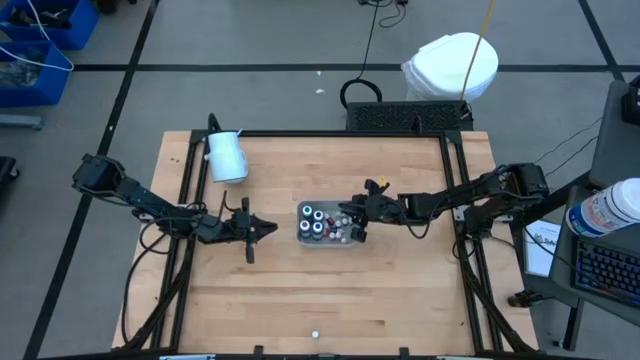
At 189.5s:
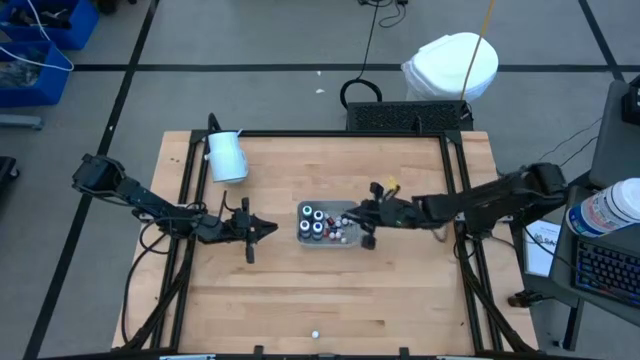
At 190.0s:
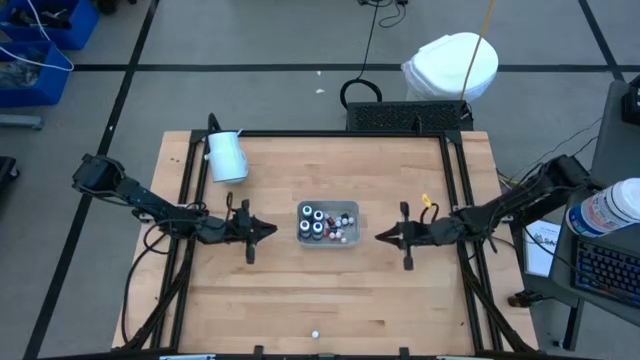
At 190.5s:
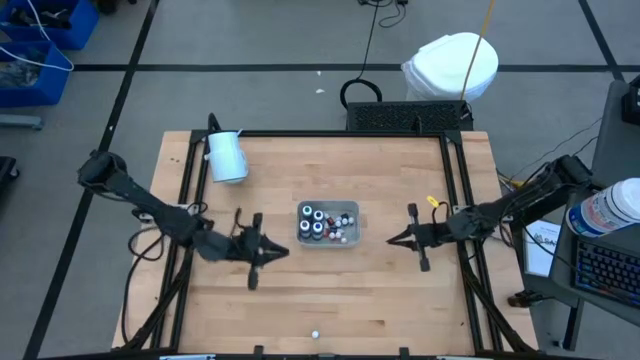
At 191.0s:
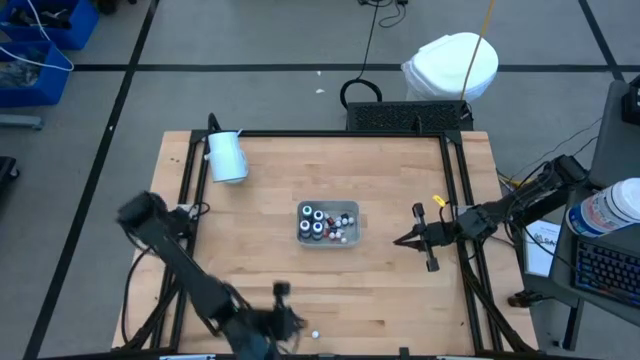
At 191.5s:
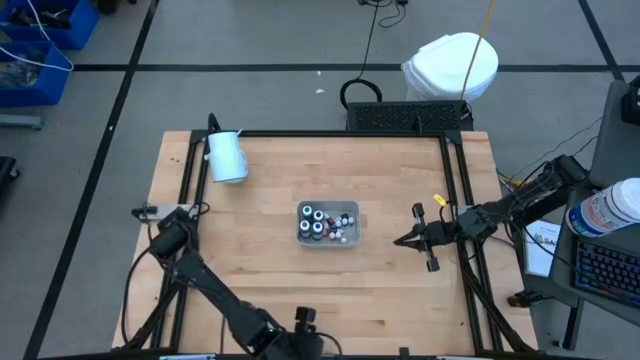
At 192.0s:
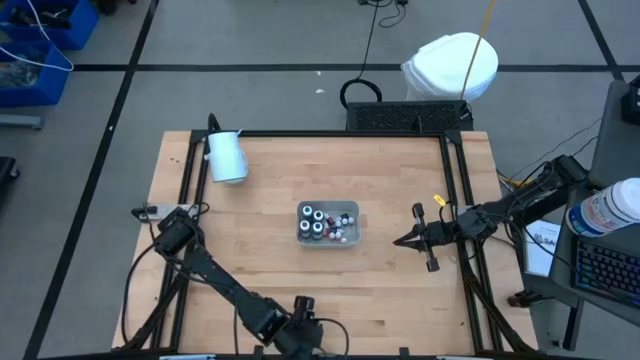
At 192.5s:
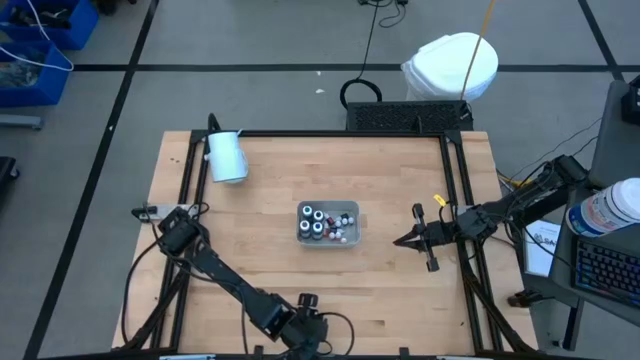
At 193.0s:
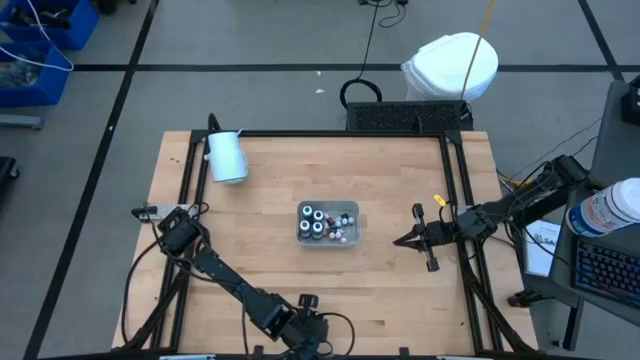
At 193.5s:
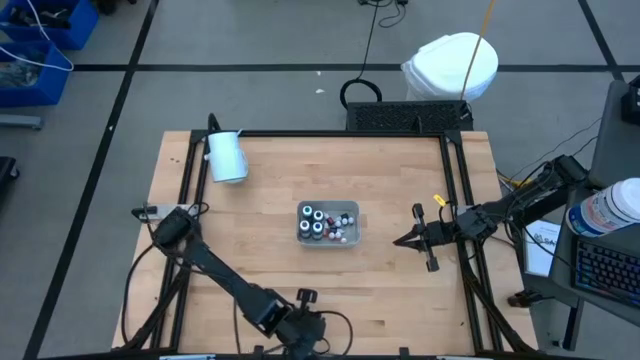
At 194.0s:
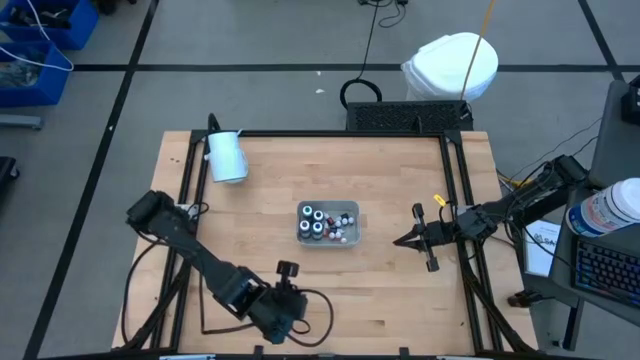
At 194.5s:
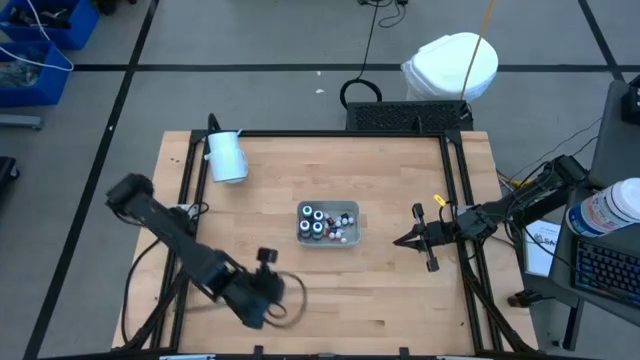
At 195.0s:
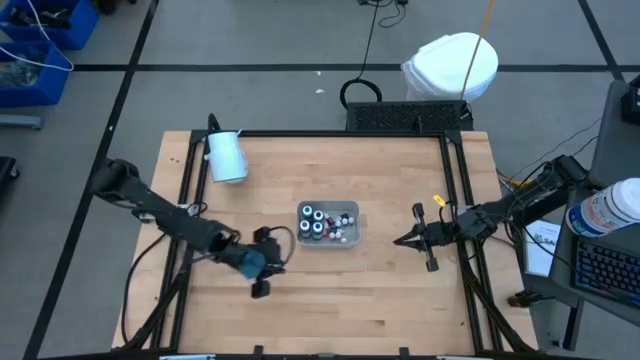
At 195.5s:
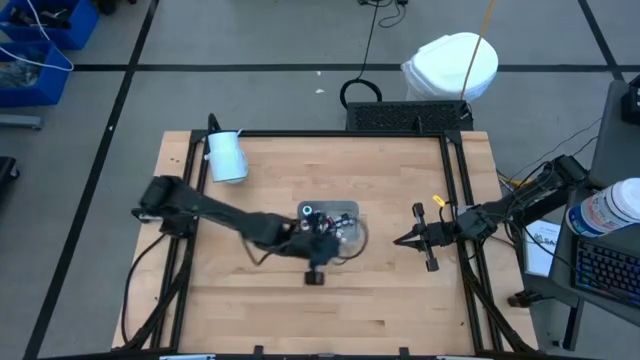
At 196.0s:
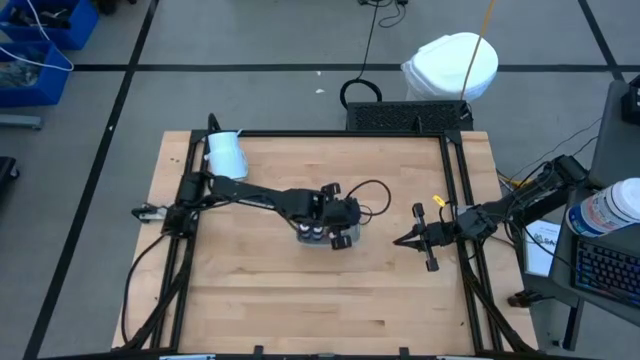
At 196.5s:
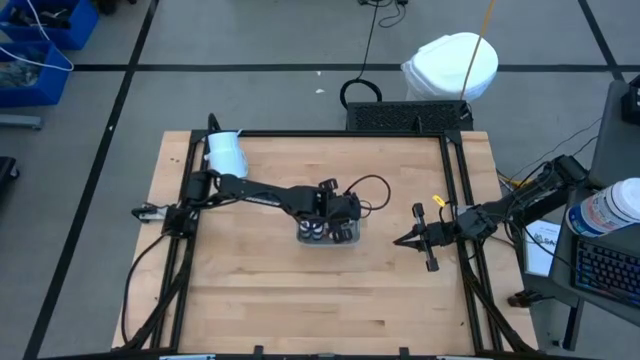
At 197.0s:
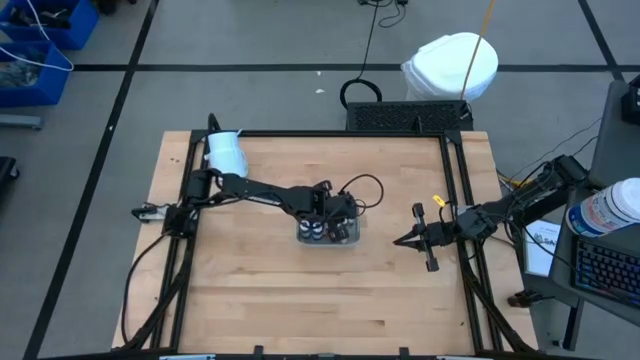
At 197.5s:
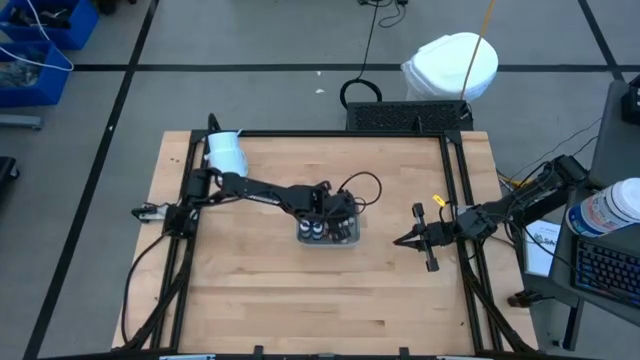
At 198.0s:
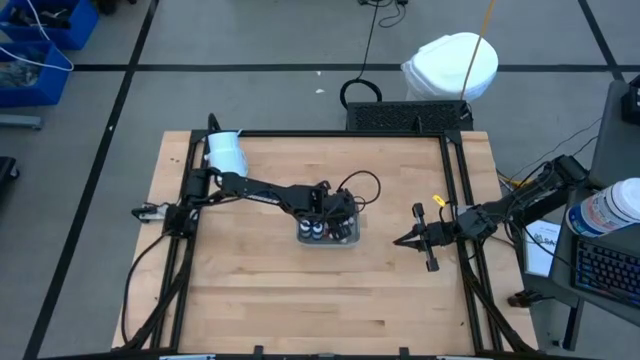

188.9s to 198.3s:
Task: Pick & Place food coloring
Put the small violet food coloring bottle into the gray bin

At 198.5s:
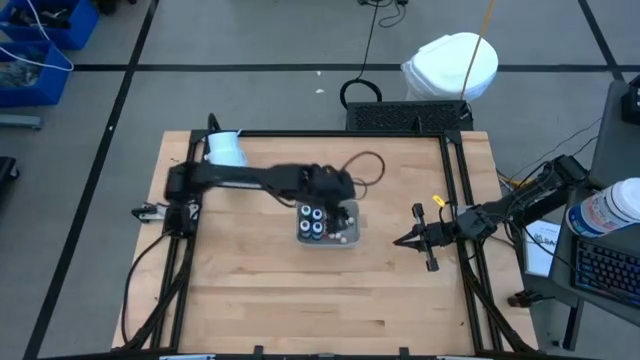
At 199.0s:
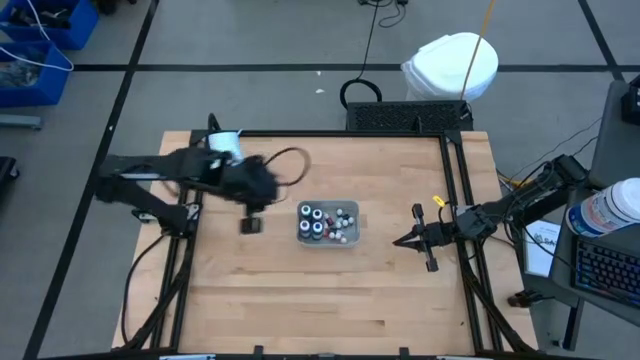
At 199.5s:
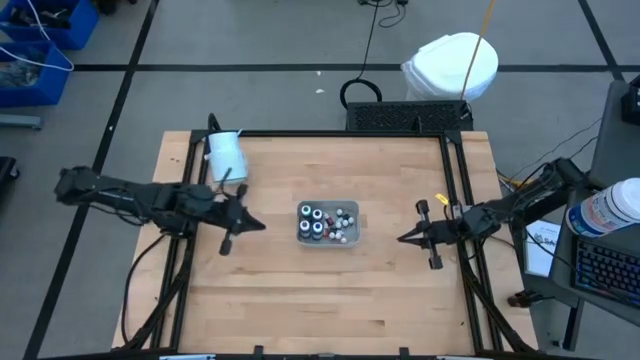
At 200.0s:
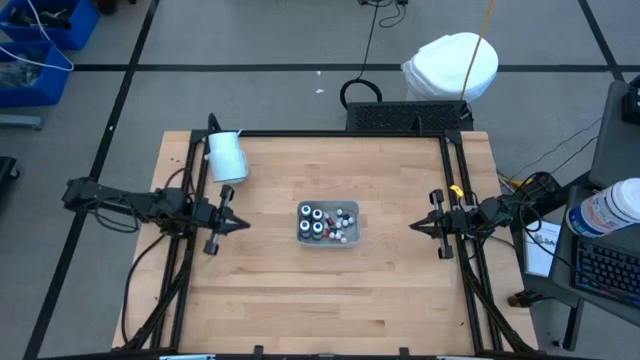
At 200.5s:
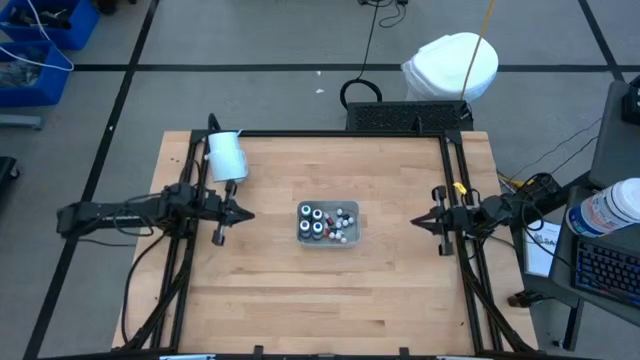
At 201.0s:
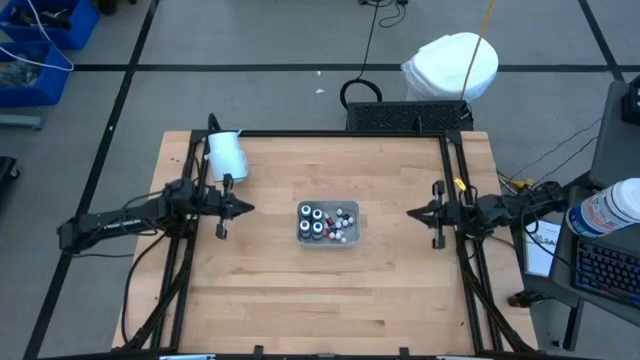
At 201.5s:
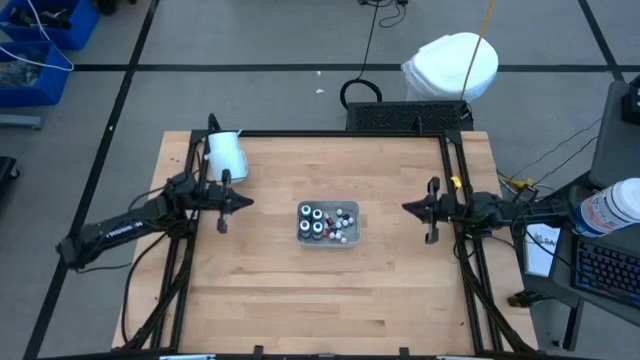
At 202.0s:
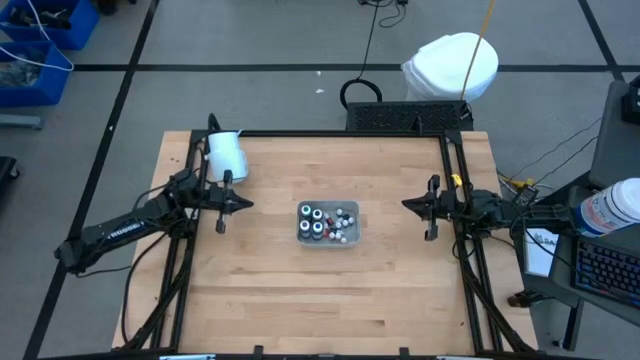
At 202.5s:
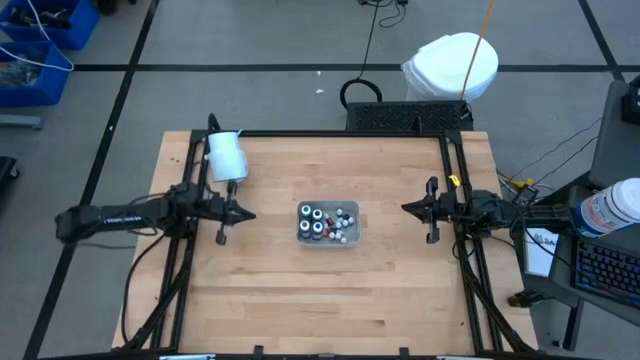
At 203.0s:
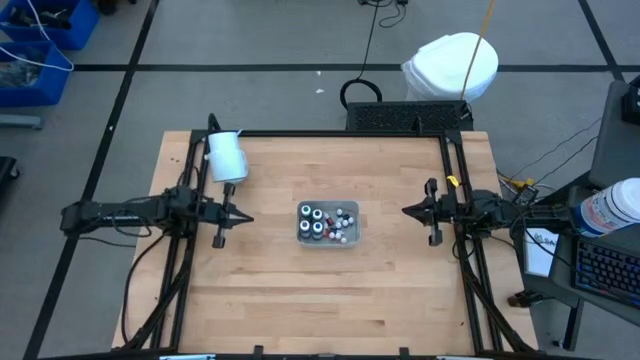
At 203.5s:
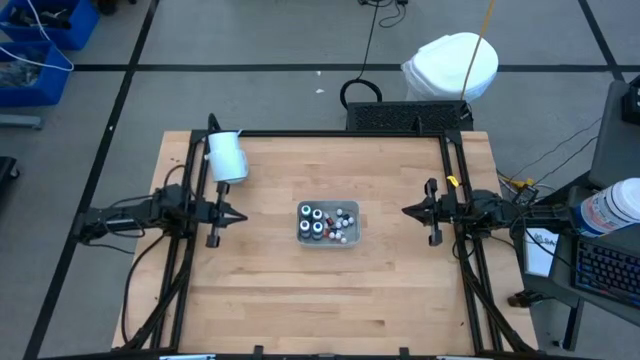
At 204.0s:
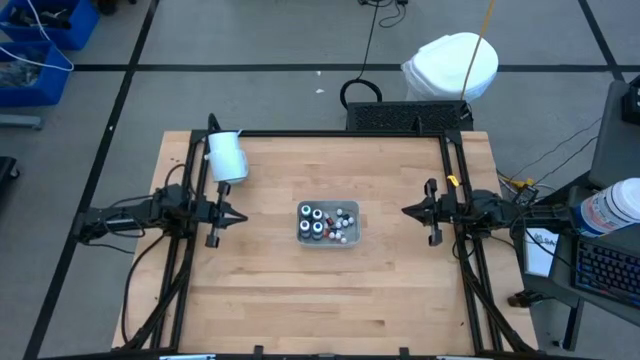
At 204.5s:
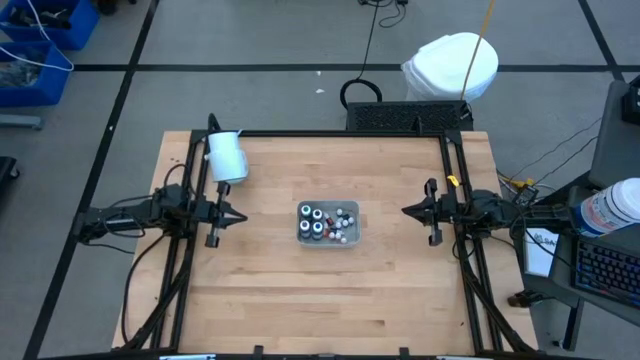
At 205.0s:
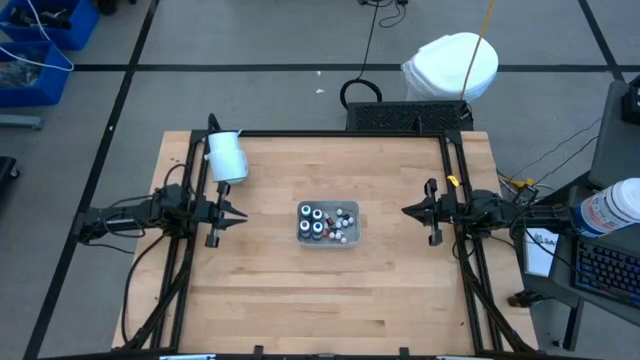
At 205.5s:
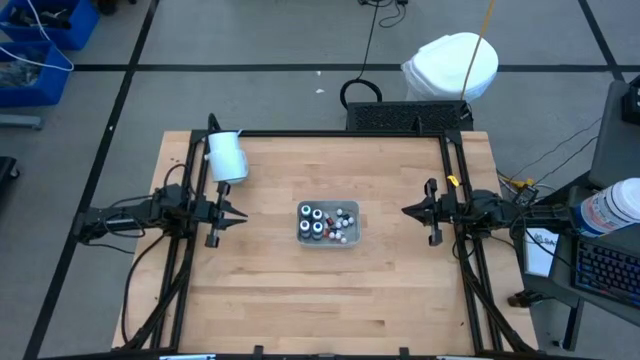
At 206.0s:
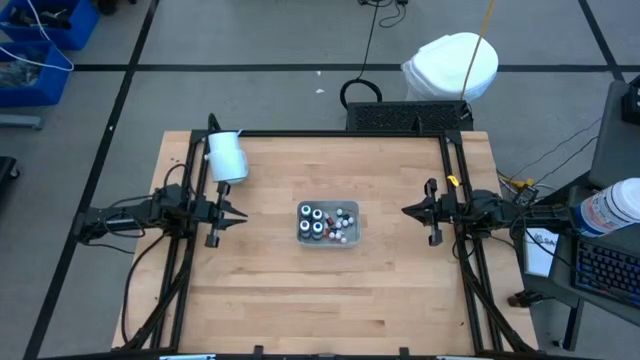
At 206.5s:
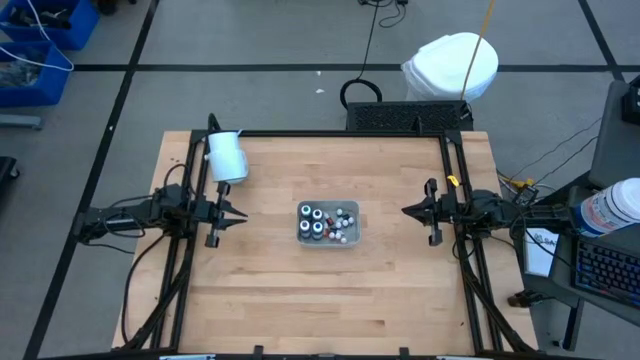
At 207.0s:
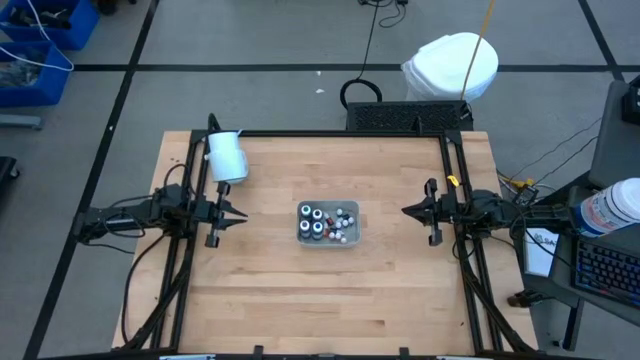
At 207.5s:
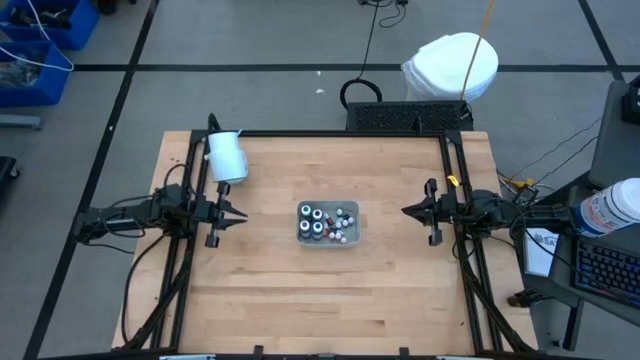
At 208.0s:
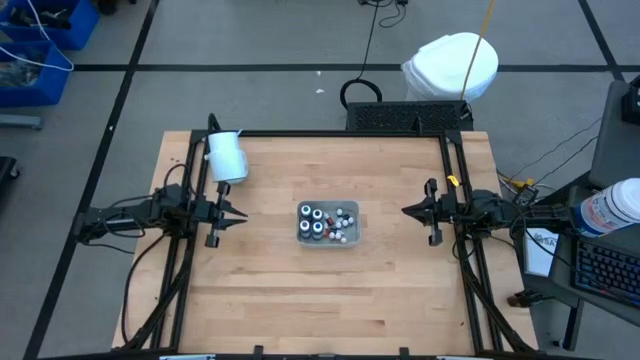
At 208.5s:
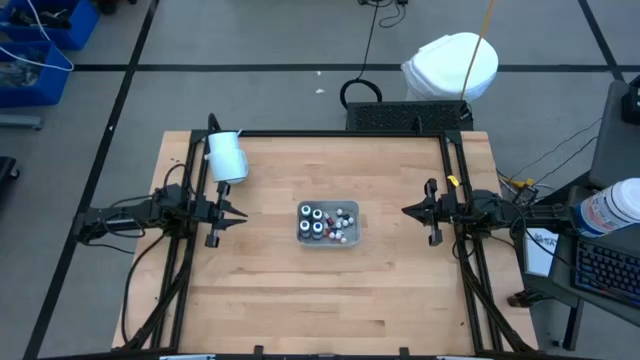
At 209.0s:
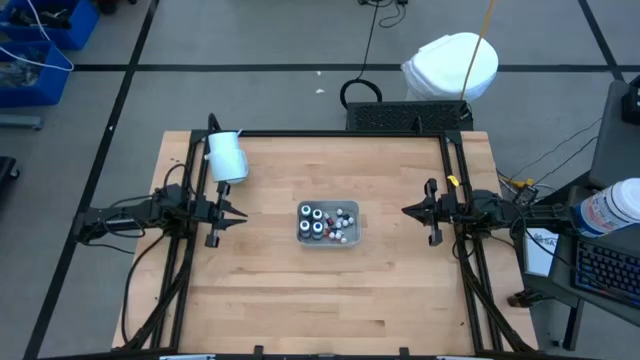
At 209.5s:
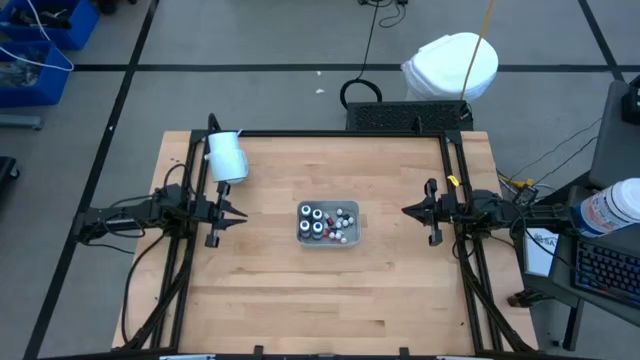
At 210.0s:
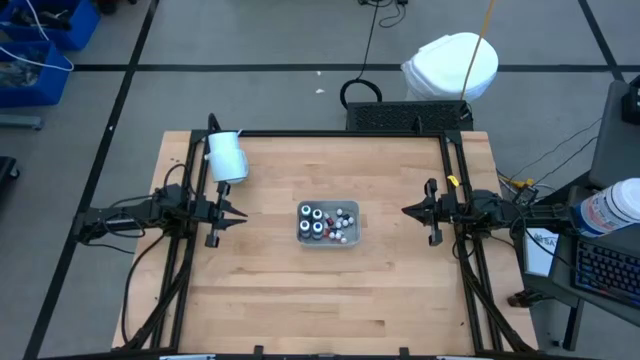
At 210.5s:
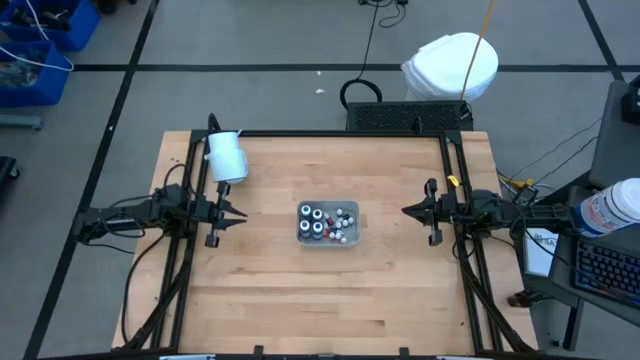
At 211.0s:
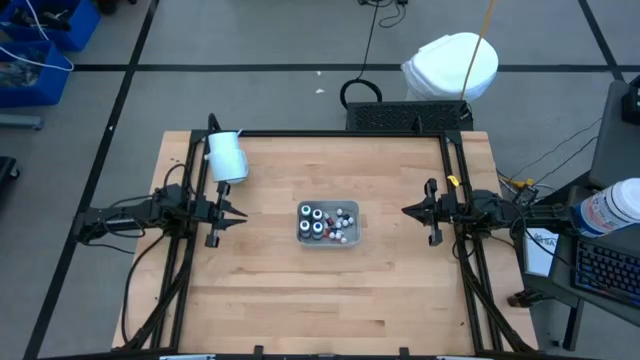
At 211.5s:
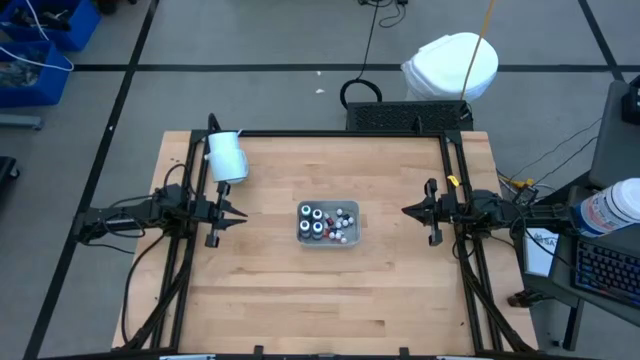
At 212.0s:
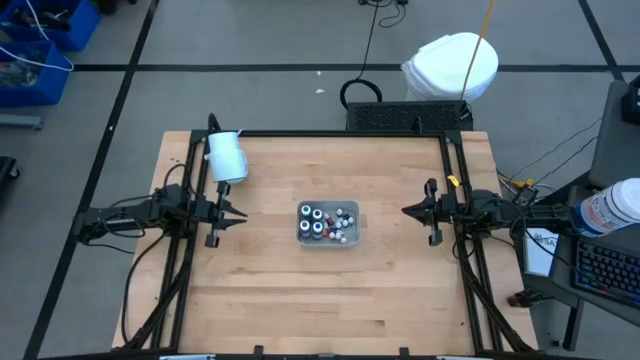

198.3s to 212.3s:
Return to Home Position
